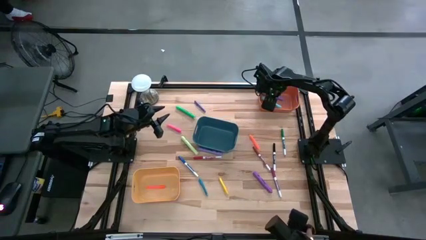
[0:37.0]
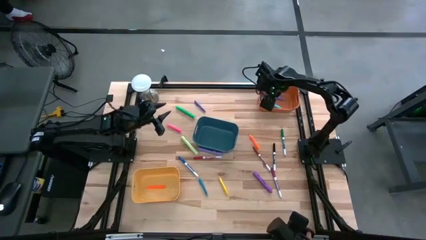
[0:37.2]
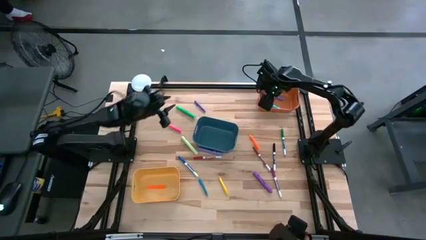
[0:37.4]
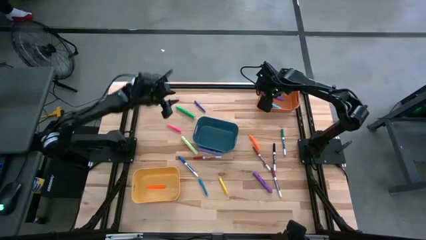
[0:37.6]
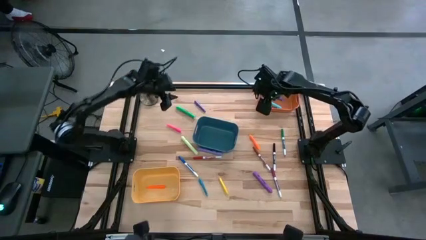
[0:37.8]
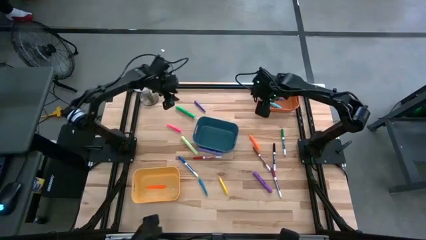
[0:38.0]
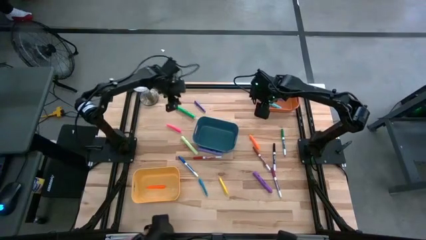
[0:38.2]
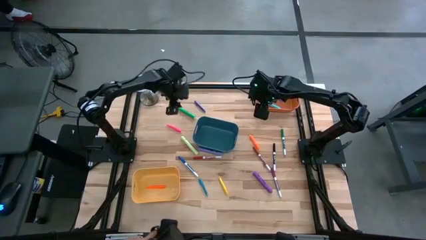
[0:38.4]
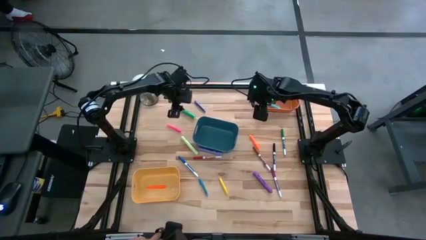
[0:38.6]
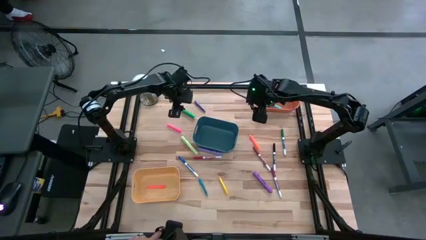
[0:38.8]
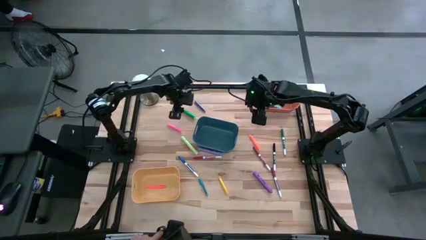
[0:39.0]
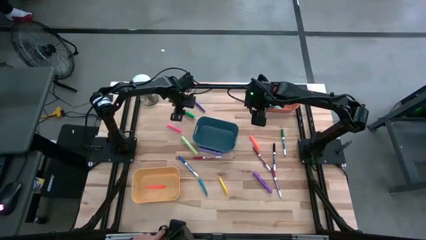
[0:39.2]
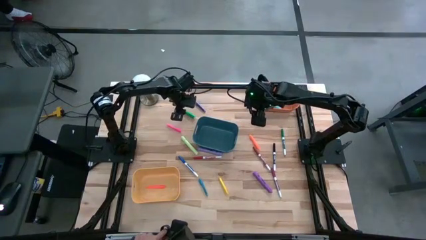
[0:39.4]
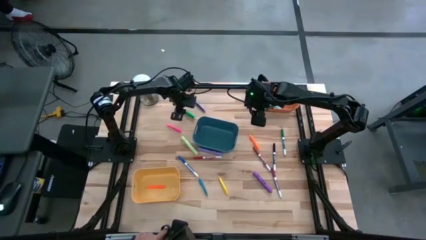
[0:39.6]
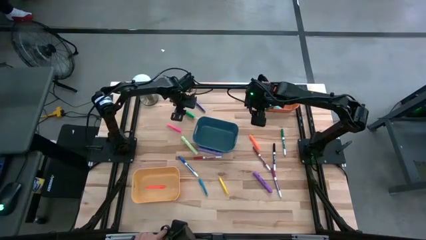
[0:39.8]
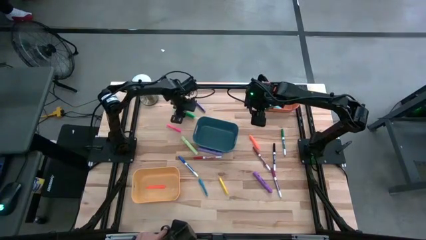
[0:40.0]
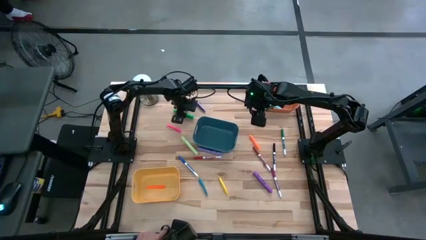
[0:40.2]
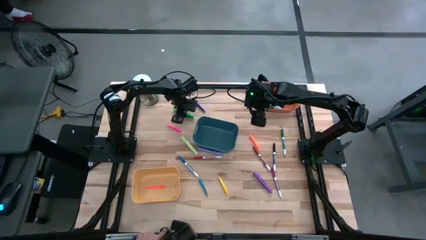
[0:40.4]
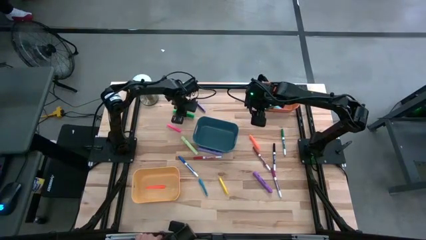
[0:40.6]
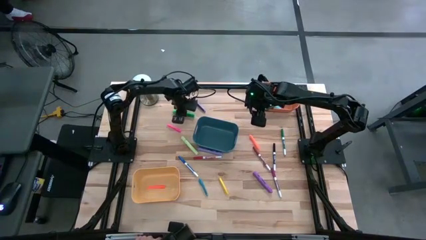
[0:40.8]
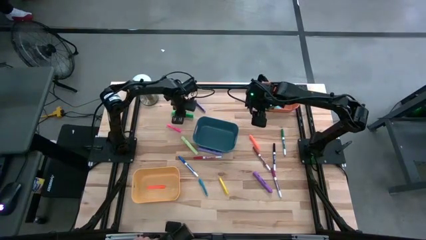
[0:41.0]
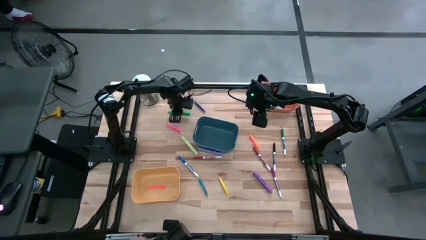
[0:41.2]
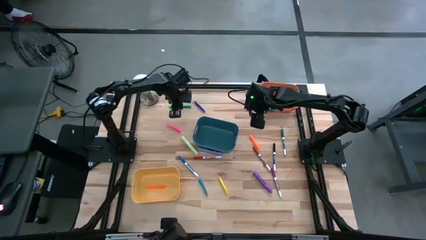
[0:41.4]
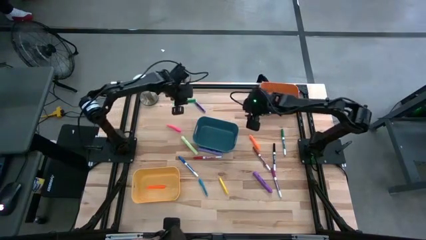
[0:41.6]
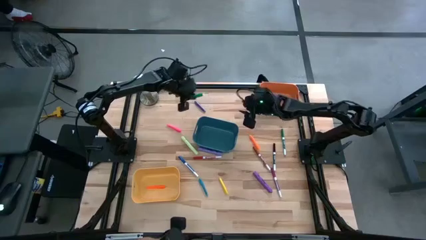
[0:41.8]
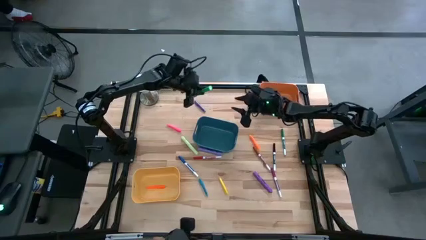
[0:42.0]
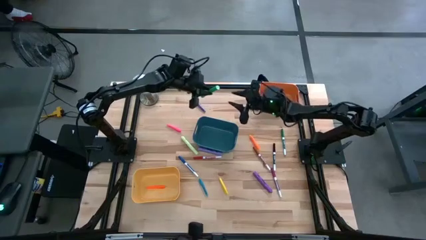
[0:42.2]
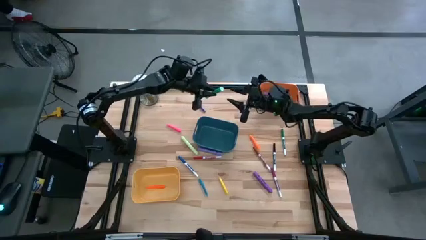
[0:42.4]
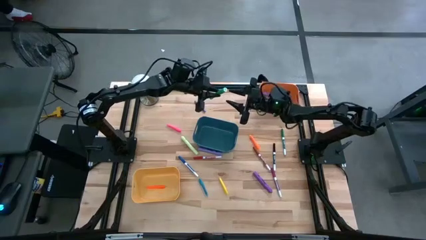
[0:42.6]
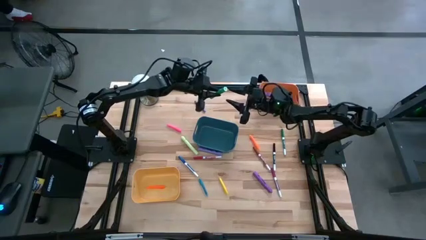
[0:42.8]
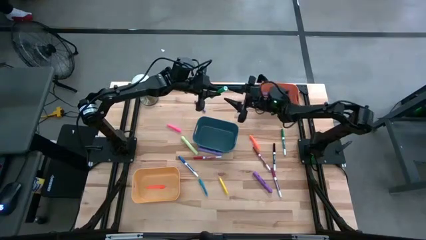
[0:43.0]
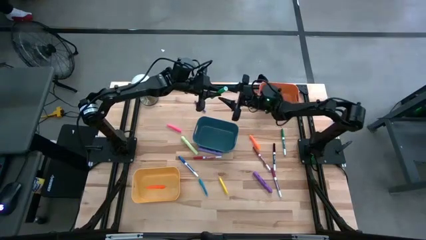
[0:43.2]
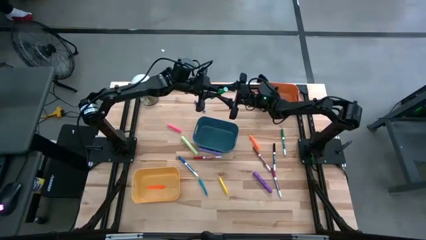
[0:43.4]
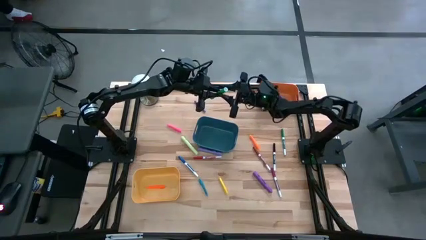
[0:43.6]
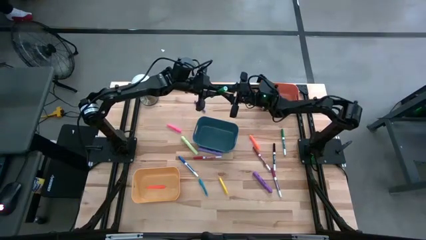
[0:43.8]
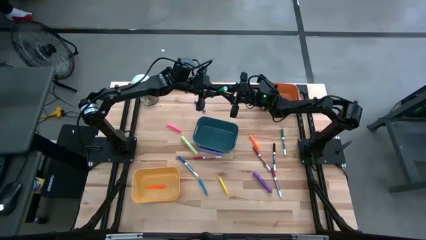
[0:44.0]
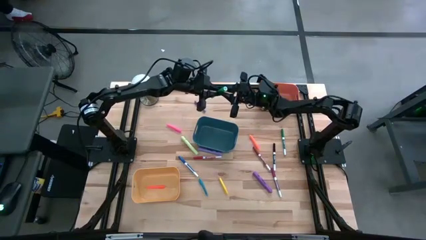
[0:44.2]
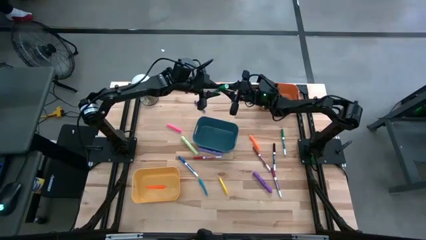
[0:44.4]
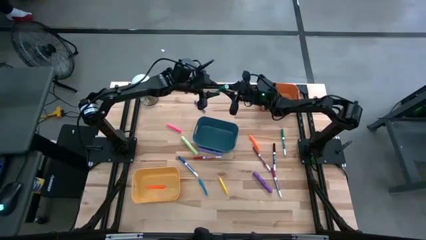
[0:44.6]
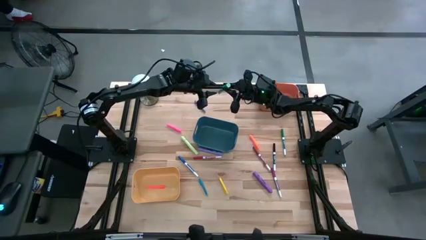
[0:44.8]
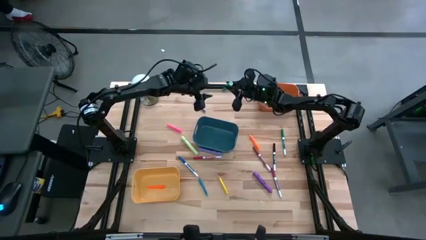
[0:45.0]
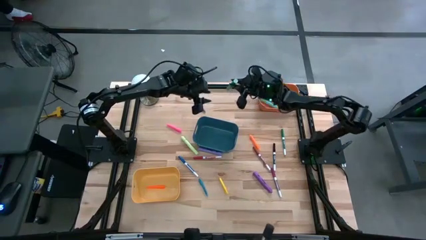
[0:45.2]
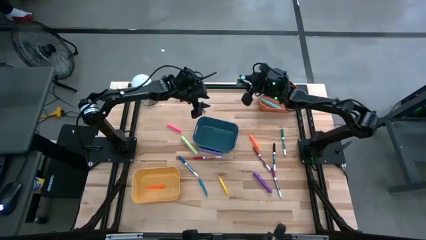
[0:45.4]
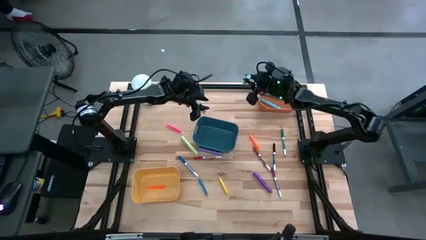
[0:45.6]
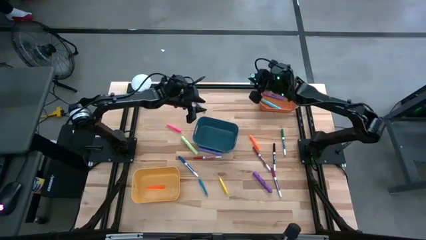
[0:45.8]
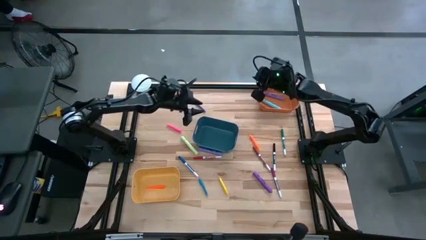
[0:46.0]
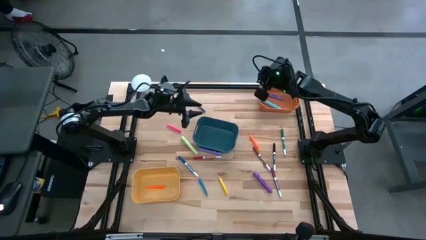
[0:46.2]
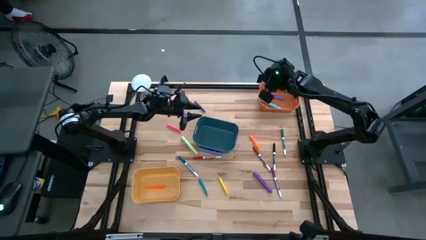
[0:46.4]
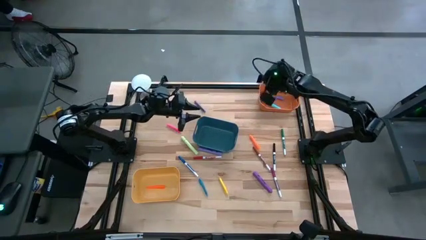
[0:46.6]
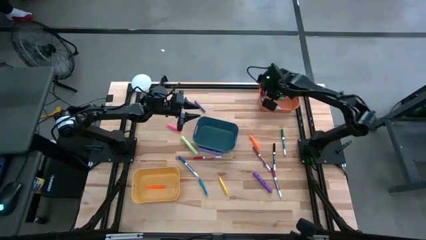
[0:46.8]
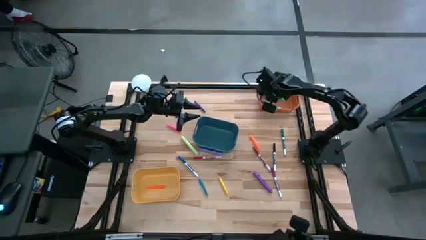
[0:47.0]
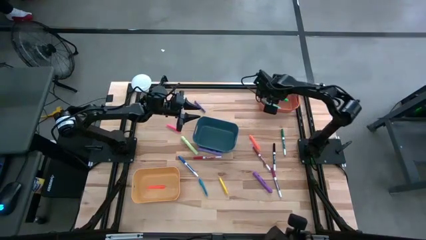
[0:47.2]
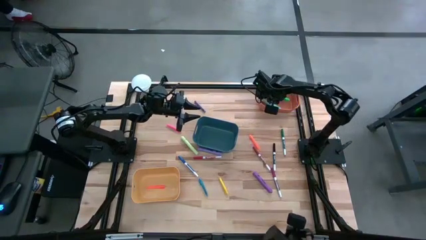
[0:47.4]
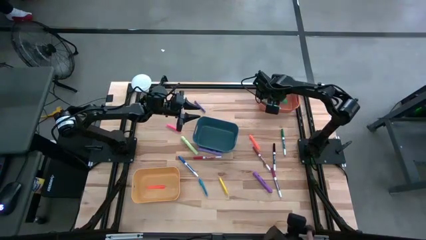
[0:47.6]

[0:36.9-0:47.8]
Task: Pick & Place Markers
Put the green highlighter pen into the orange bin
